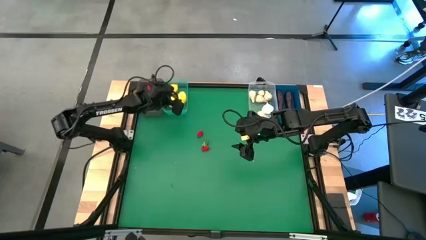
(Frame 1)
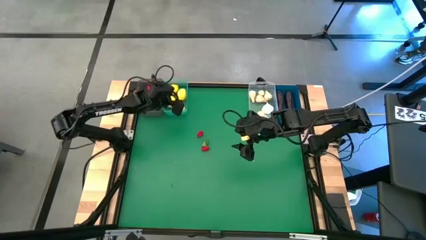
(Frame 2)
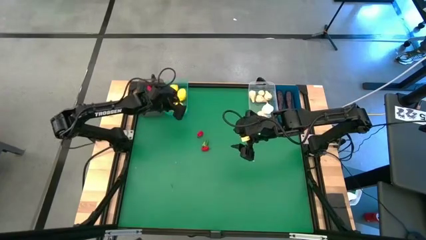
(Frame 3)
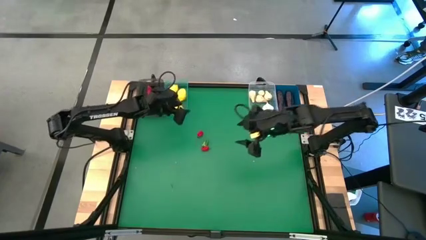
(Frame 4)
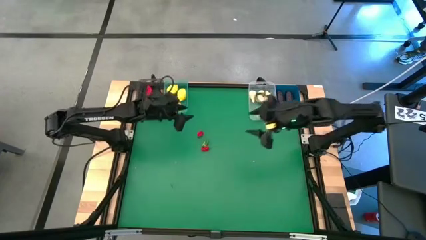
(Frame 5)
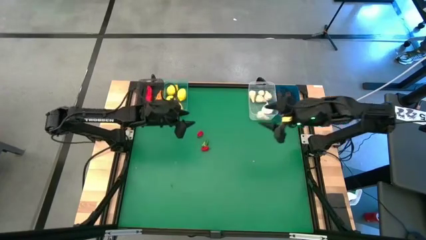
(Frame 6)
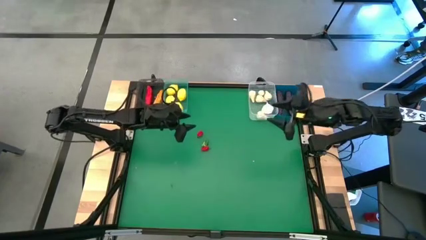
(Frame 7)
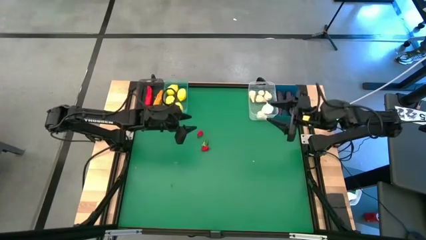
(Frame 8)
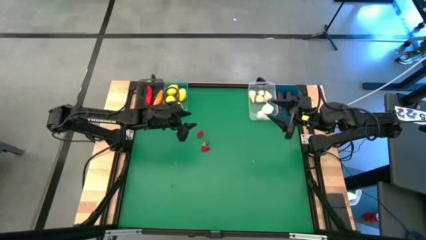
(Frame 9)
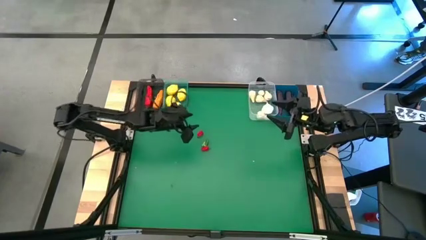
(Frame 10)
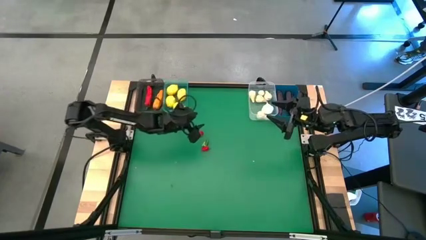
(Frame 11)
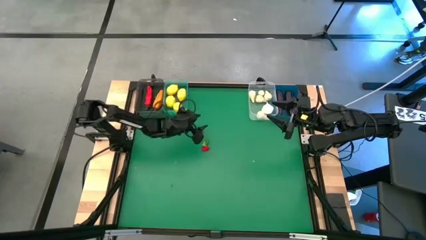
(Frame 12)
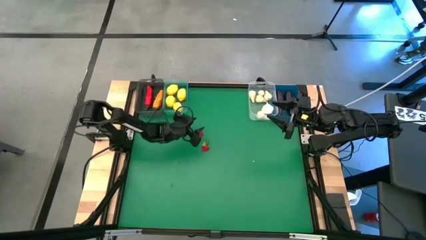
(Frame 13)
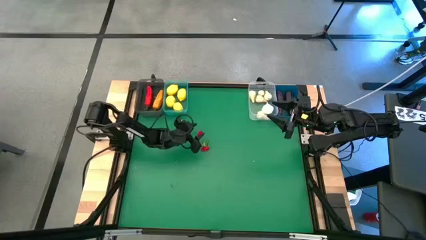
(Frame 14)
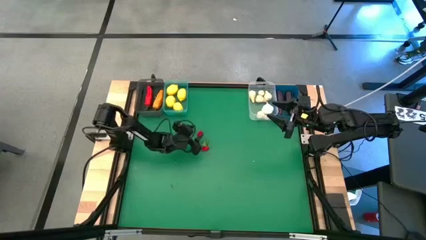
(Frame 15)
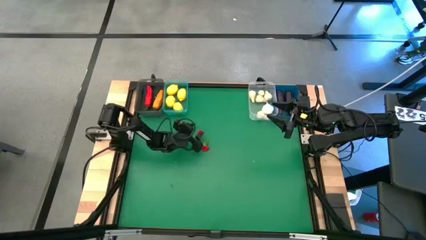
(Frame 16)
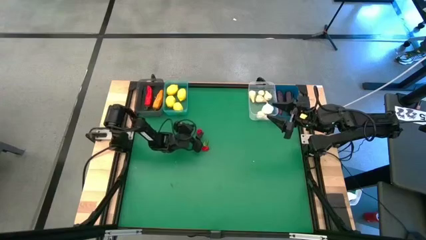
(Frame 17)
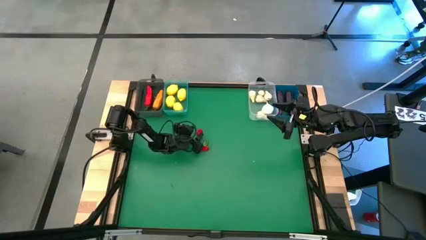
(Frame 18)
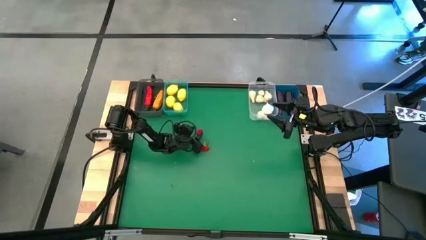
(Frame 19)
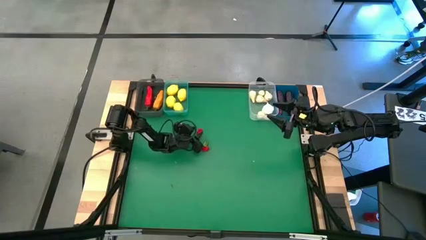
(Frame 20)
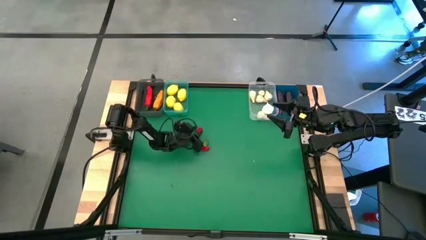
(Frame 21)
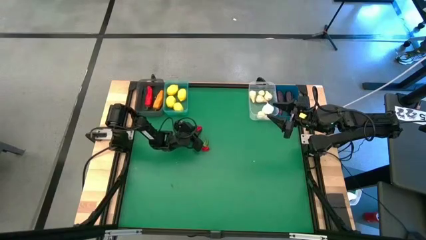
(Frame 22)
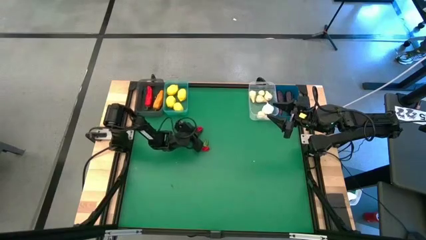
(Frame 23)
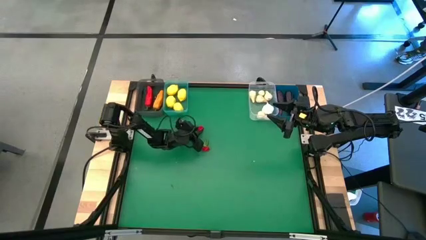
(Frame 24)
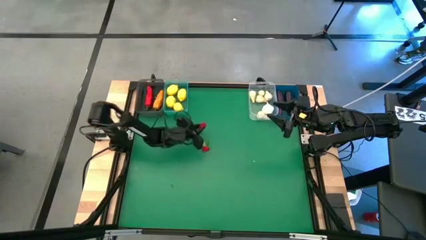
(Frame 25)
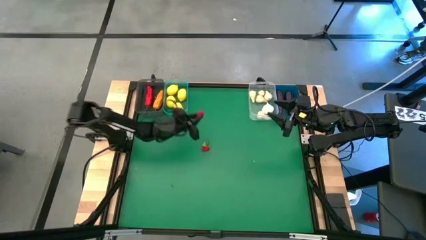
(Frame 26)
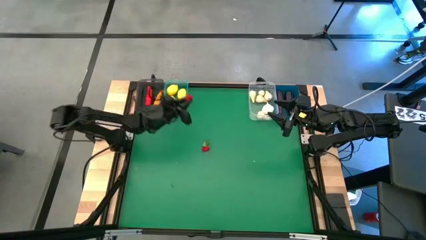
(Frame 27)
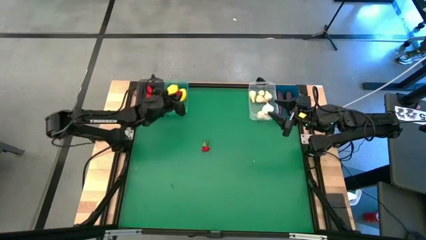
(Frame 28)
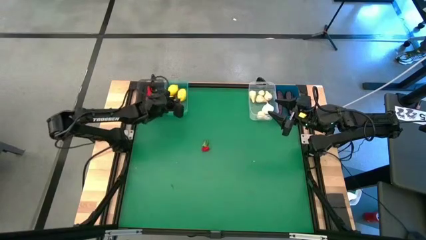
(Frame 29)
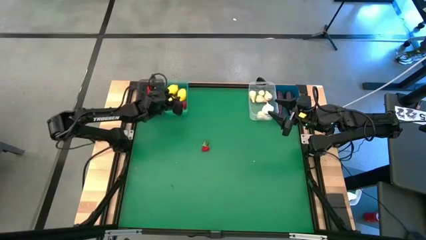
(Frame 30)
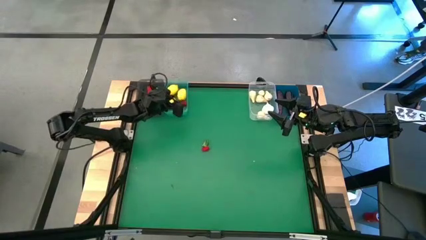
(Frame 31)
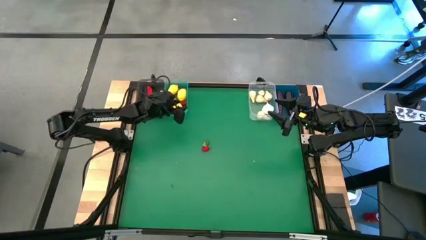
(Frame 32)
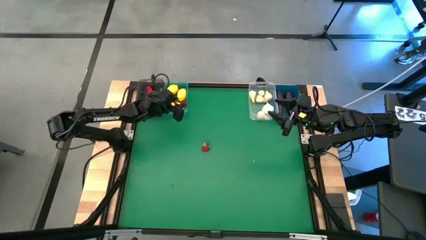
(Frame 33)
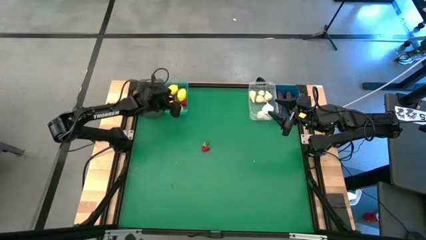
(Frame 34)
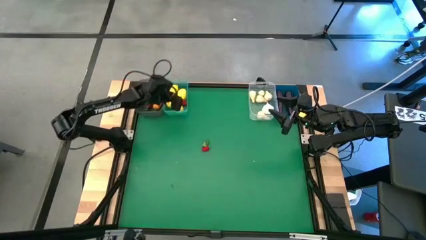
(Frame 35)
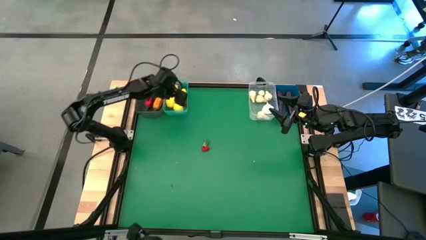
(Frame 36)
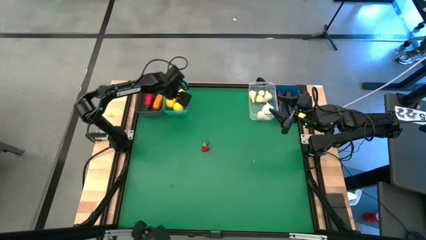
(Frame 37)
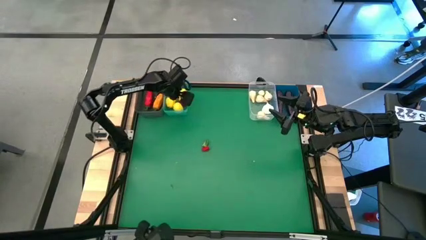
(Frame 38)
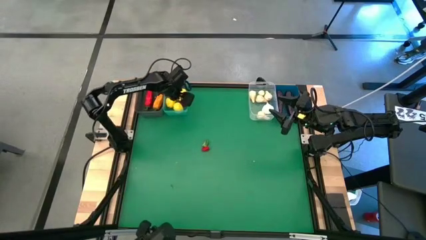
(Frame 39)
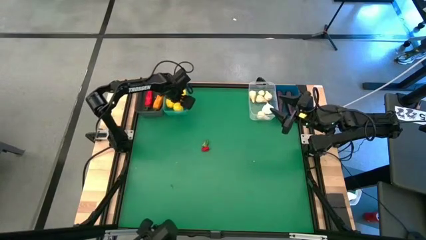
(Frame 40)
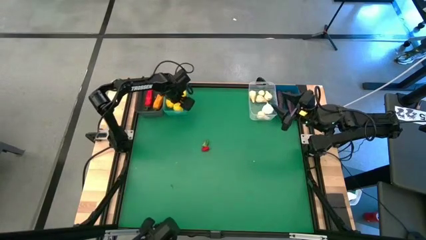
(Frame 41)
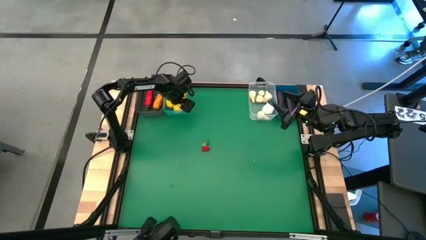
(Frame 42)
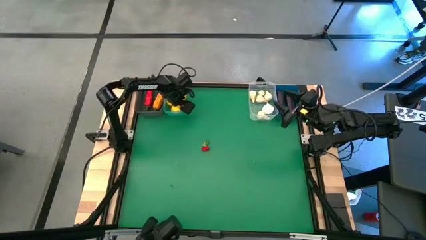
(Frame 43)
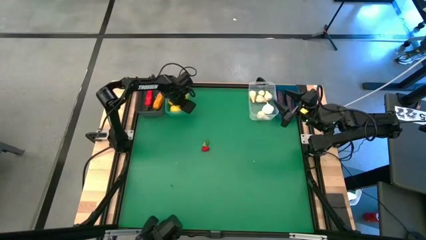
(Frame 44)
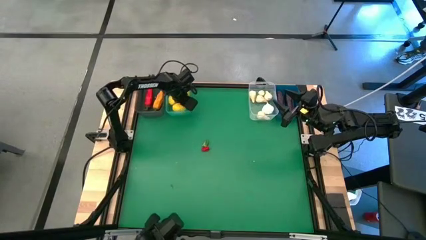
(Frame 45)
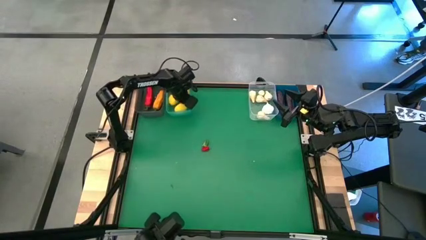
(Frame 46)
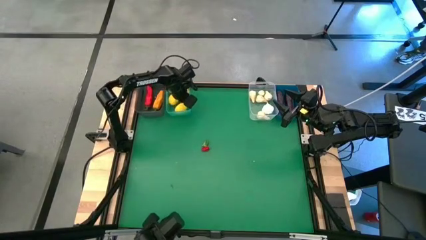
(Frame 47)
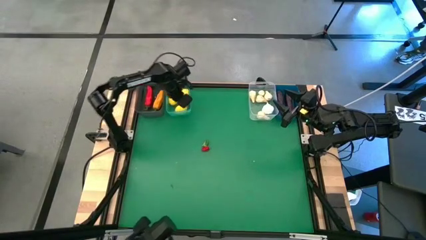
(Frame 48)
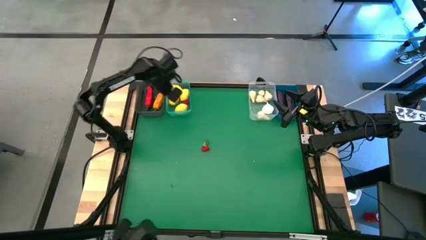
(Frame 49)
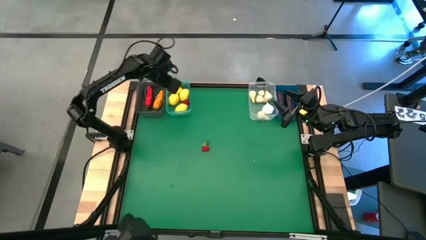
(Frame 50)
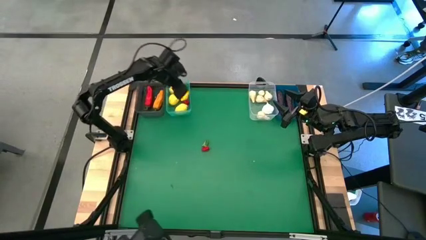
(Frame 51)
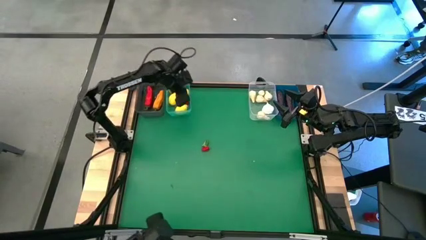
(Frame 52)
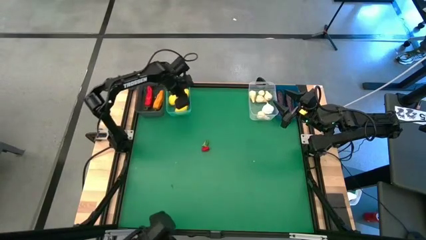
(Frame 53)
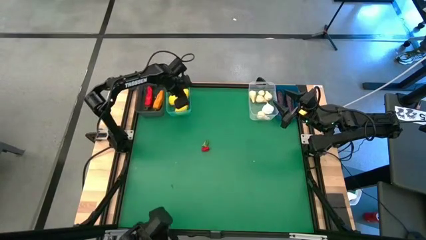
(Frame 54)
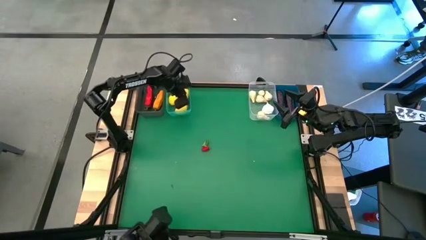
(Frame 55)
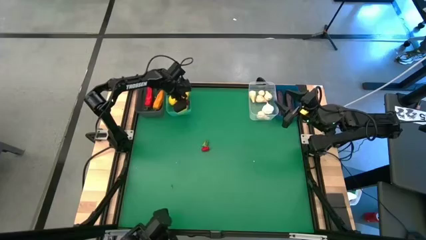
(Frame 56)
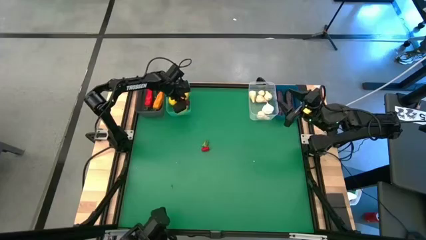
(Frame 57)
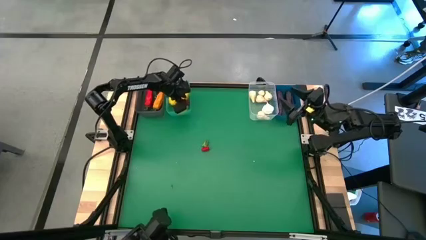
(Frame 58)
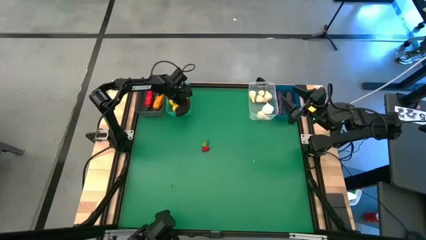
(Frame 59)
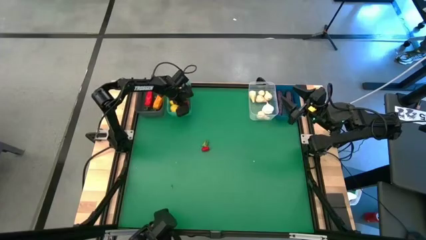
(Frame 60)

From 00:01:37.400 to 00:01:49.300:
Task: Sort produce into baskets
Put the top red pepper into the black bin

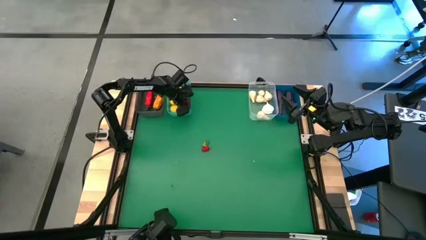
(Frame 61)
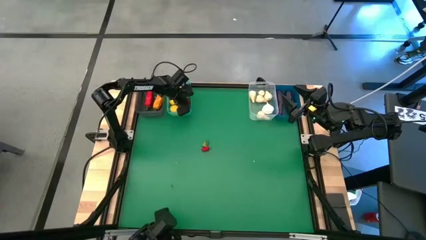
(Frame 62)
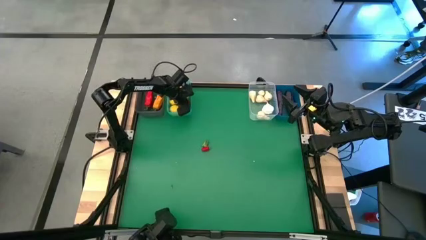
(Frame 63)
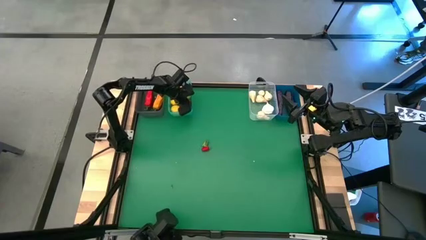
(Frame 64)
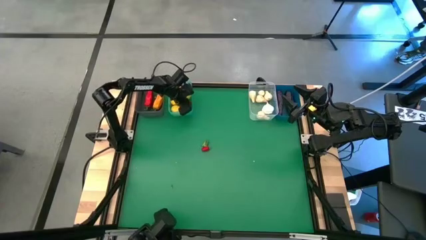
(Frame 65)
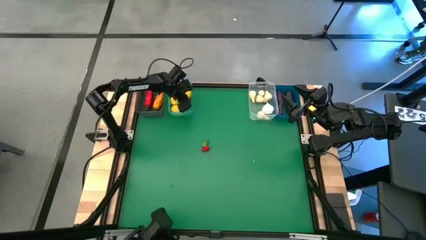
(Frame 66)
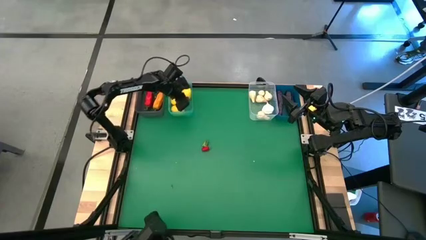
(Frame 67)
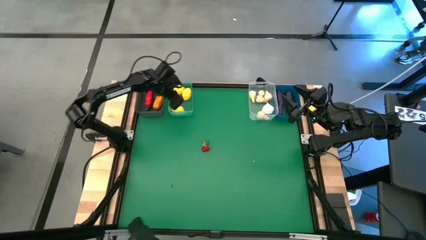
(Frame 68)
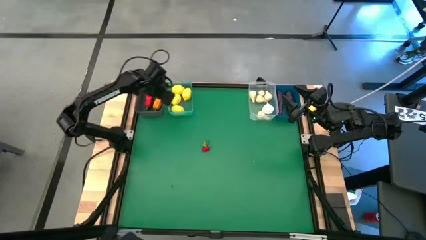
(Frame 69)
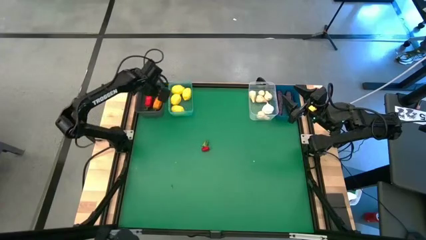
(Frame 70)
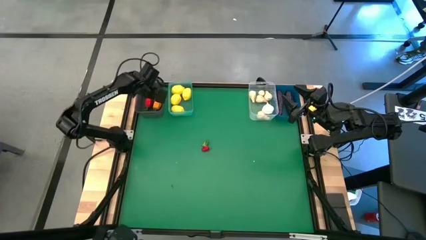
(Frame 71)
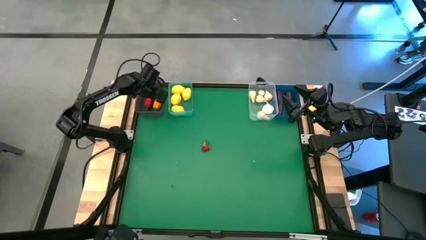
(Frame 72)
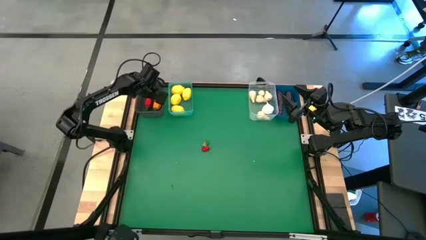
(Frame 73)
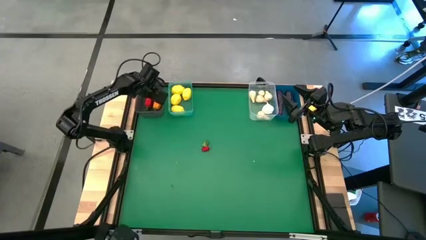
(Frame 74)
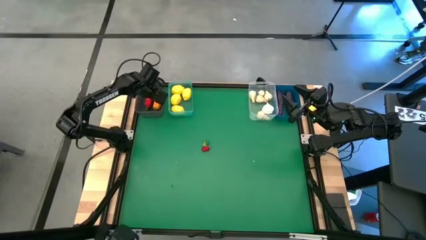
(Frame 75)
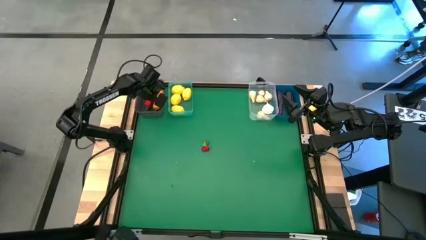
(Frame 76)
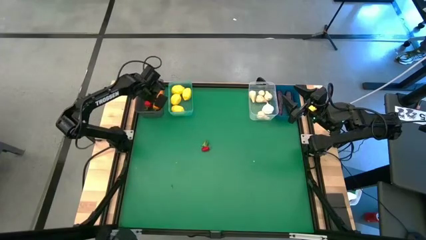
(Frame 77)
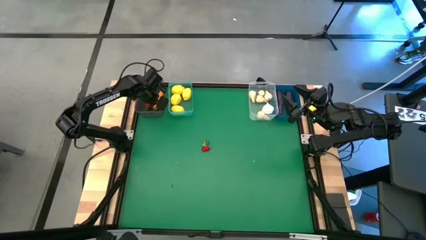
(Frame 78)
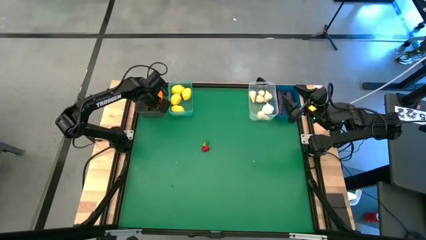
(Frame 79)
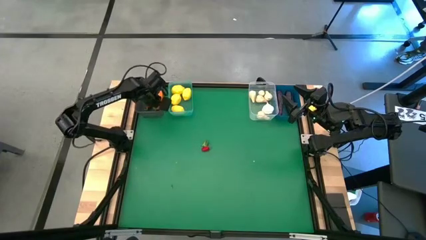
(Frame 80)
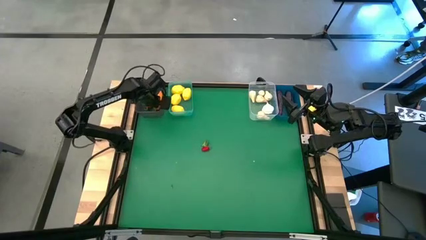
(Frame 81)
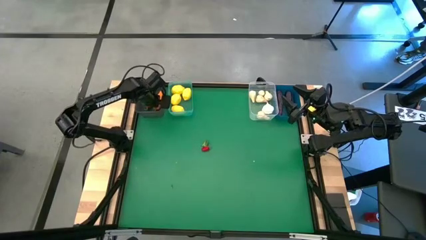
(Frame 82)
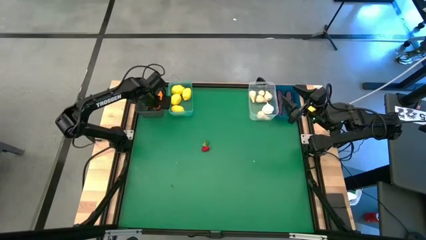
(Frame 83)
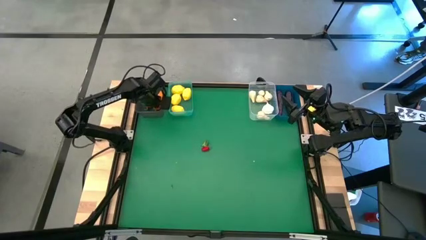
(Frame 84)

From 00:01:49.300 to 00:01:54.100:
Put the red pepper from the light blue bin into the black bin
